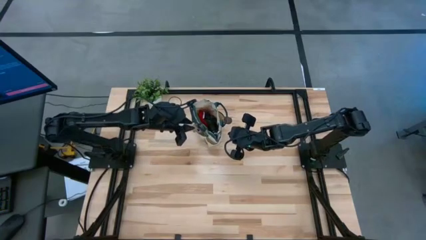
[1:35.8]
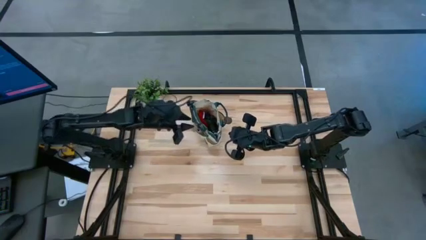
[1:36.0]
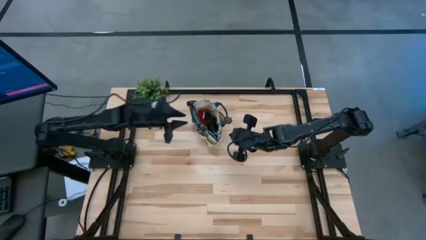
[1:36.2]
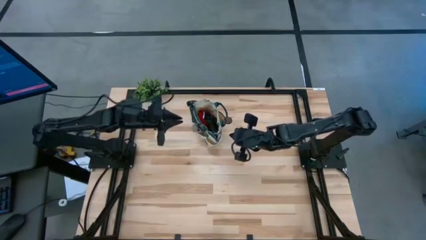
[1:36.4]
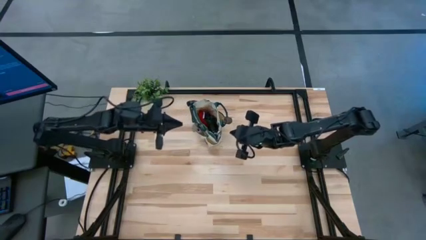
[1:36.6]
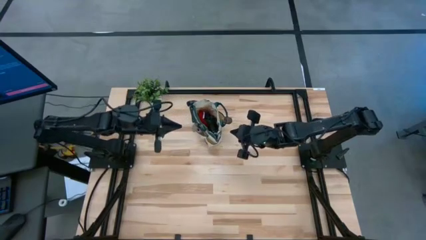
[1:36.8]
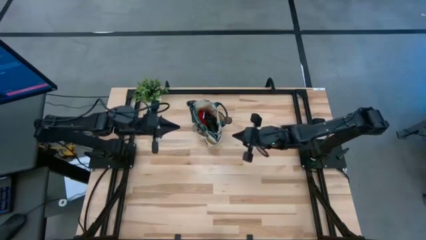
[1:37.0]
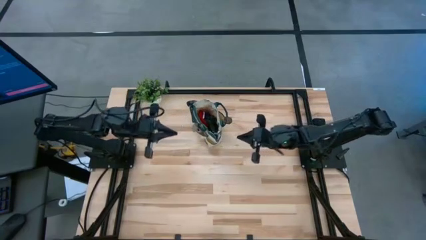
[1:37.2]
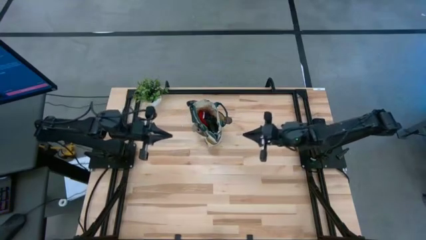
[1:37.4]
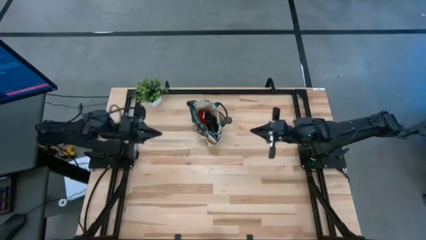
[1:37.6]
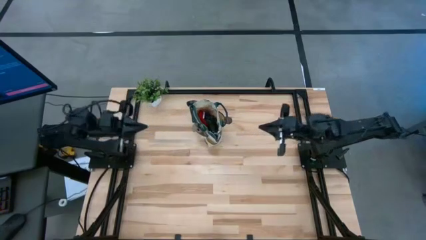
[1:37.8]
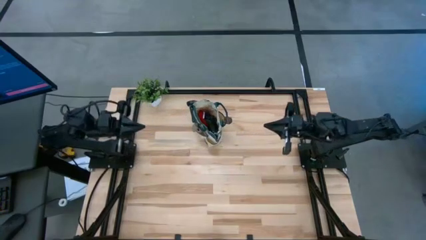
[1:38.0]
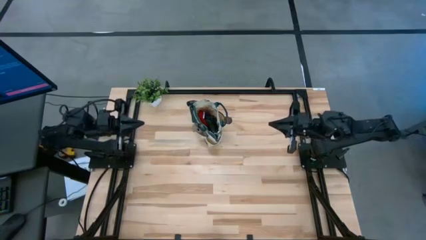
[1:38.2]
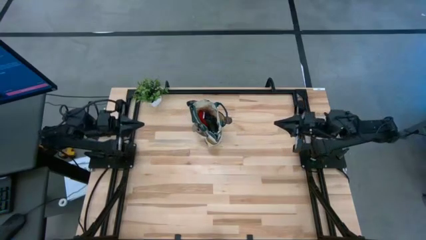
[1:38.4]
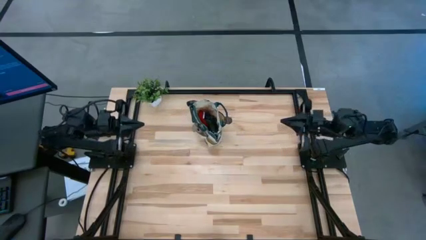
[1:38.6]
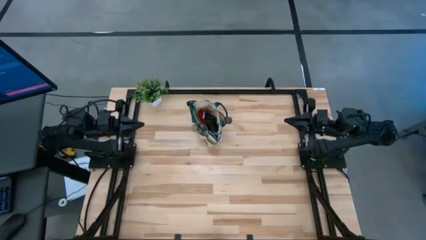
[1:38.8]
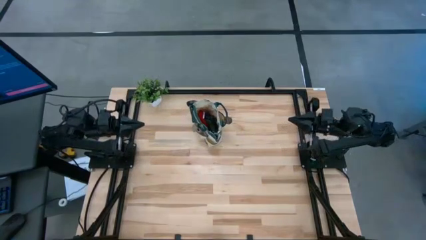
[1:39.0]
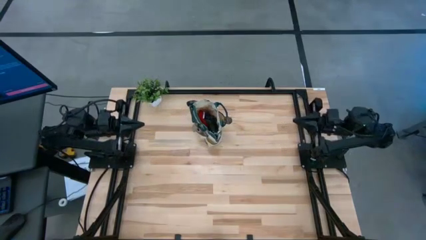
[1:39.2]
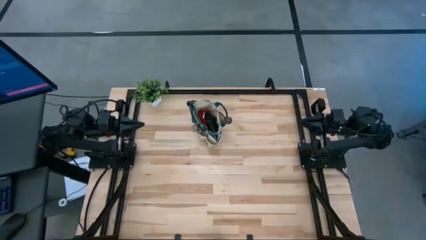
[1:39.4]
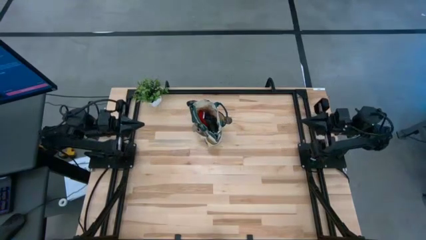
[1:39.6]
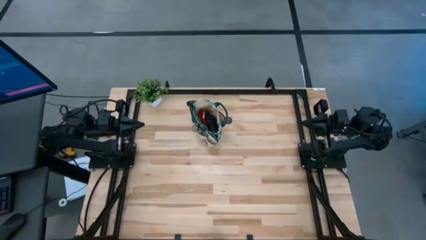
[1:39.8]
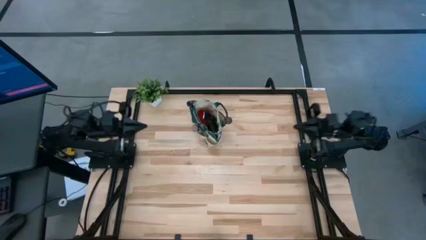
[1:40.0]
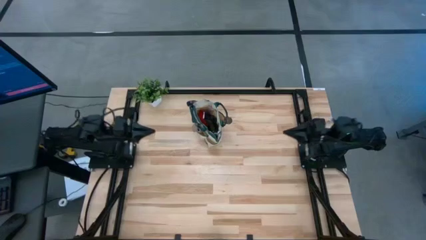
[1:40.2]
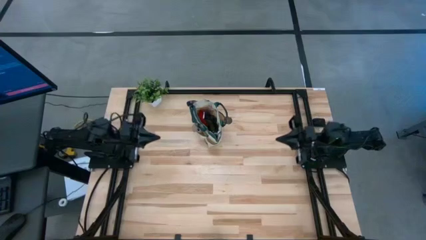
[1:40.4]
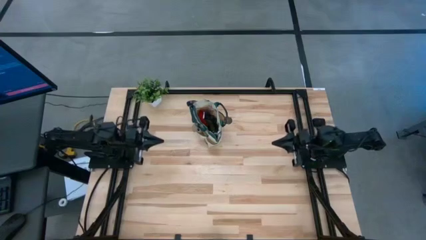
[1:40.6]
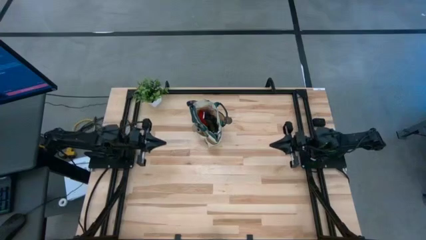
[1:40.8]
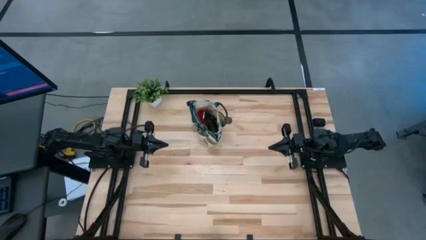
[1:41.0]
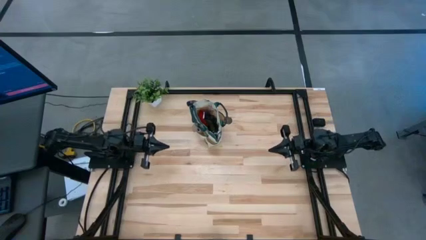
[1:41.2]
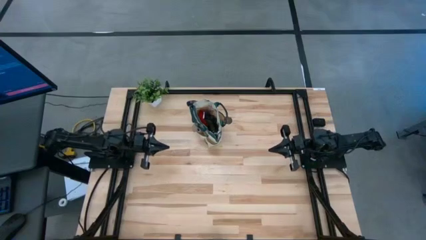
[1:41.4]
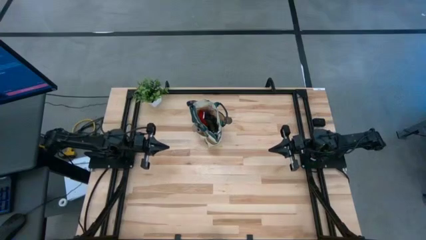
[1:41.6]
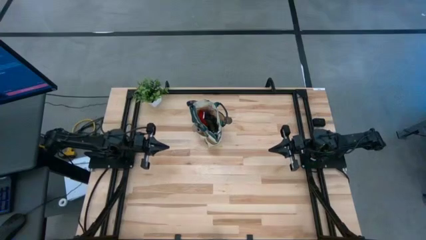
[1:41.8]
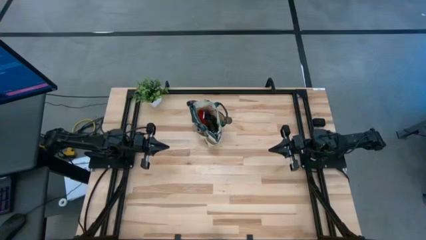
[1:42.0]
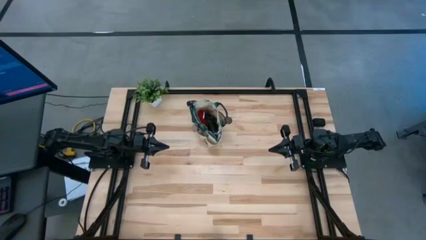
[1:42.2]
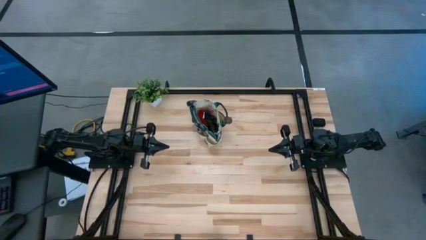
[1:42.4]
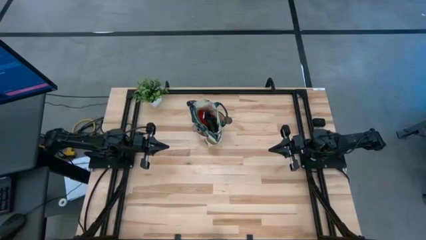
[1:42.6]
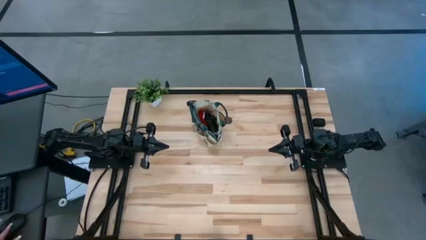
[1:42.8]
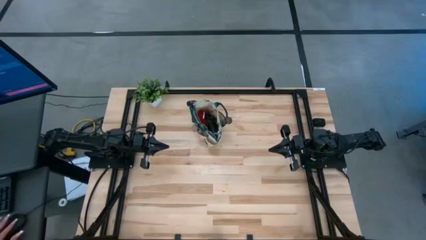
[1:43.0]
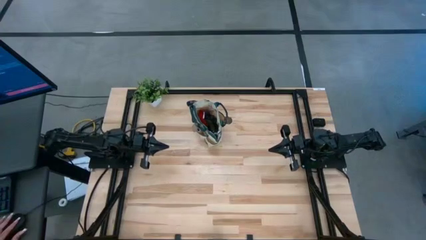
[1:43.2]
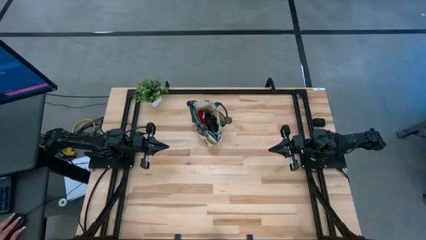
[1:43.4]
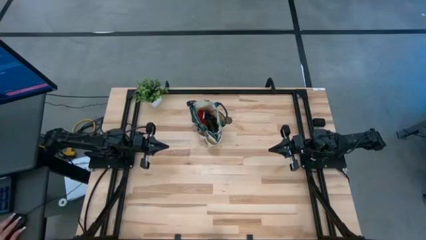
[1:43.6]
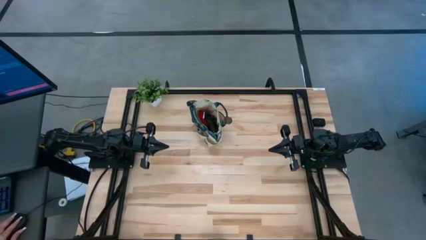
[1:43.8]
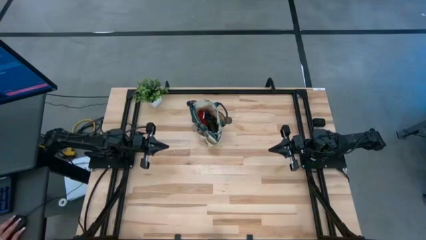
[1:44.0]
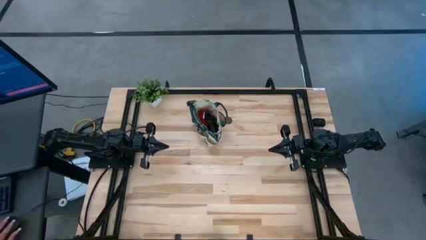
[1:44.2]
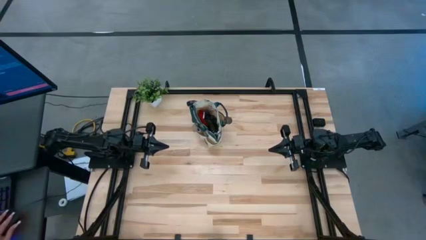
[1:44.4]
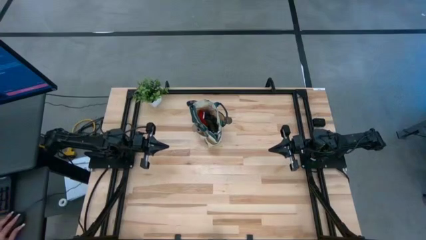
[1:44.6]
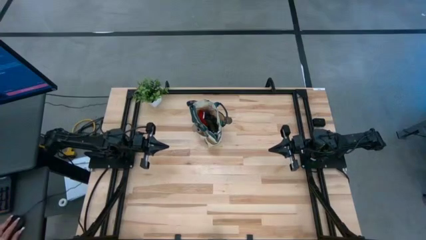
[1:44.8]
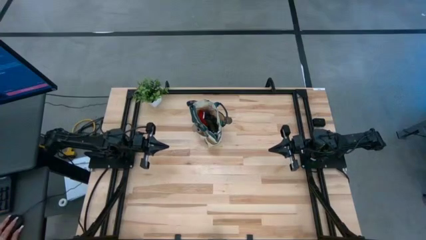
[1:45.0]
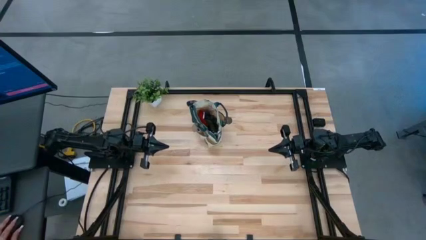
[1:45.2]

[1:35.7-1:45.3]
Task: Pick & Place Garden tools in Gardening bag
Return to Home Position

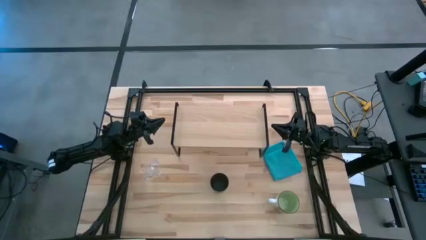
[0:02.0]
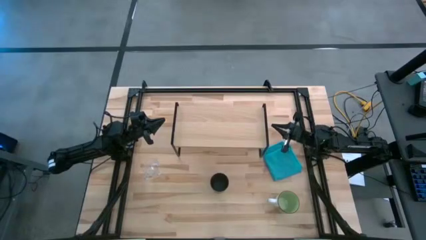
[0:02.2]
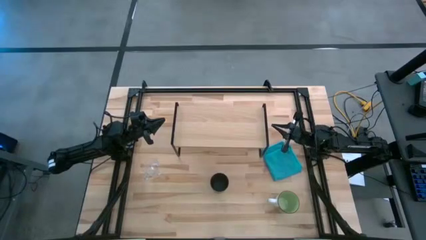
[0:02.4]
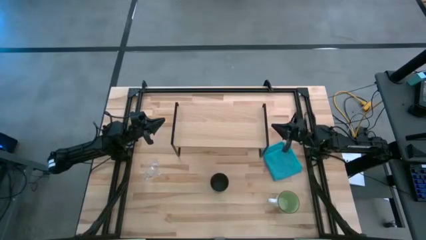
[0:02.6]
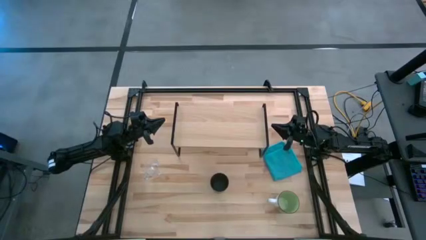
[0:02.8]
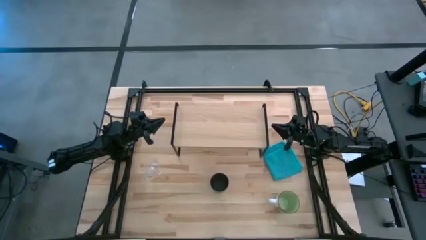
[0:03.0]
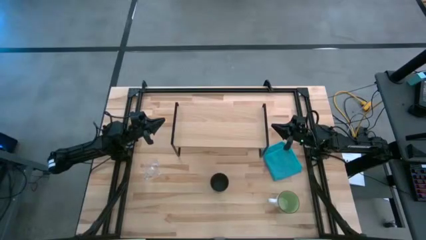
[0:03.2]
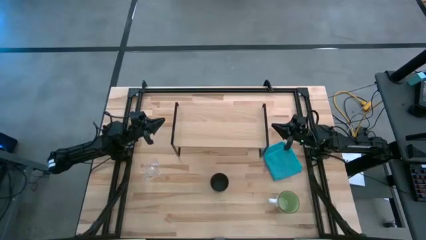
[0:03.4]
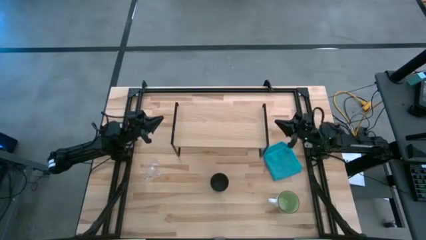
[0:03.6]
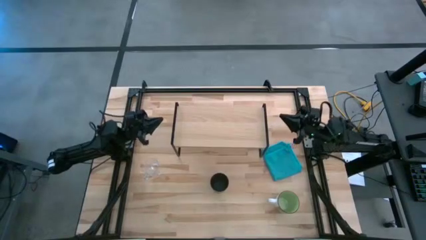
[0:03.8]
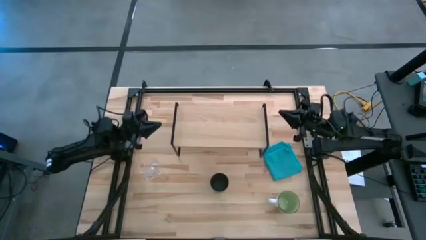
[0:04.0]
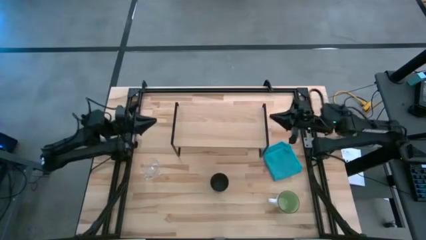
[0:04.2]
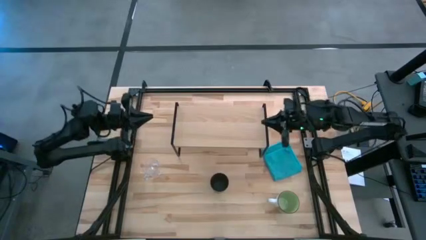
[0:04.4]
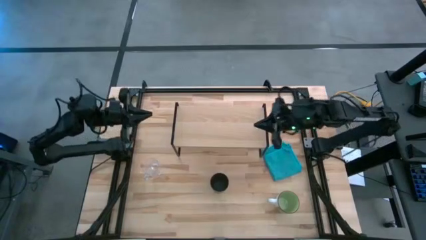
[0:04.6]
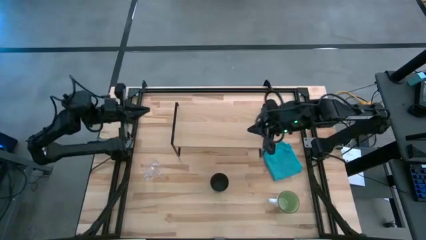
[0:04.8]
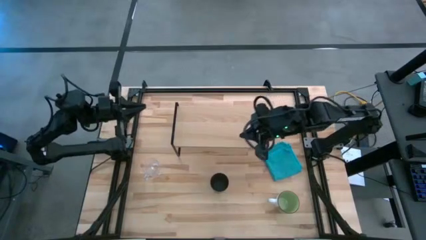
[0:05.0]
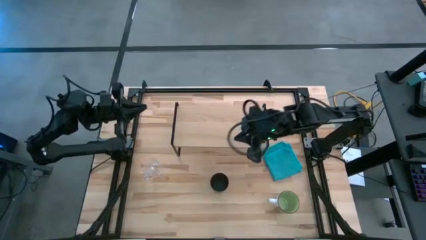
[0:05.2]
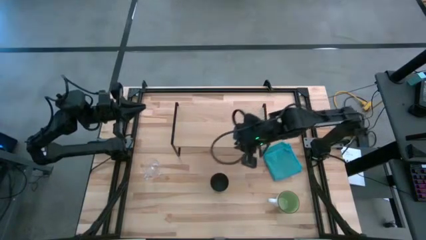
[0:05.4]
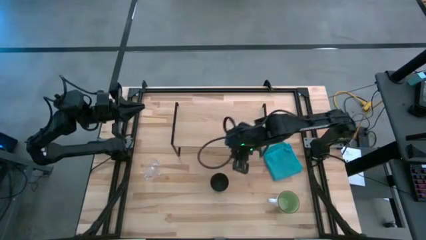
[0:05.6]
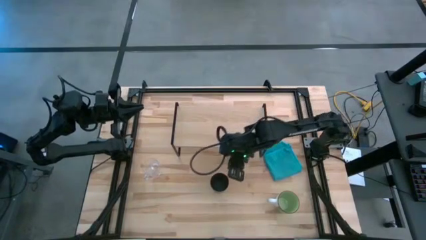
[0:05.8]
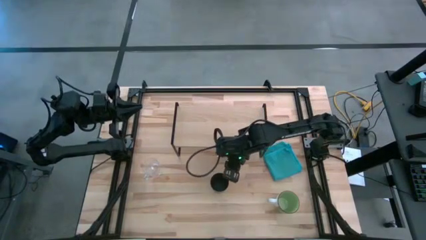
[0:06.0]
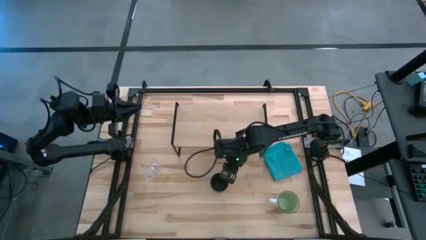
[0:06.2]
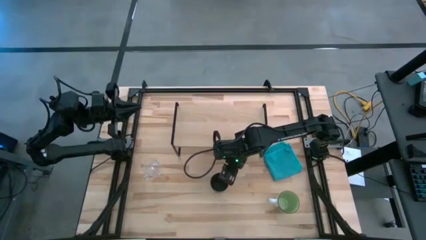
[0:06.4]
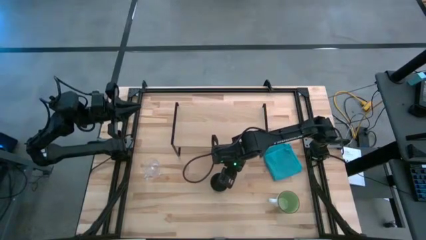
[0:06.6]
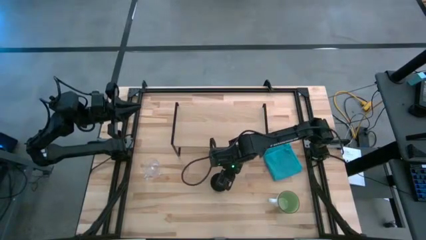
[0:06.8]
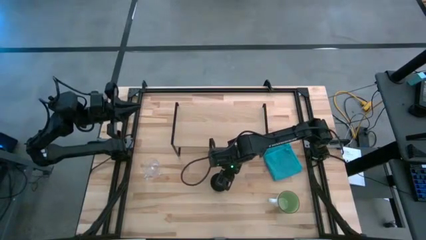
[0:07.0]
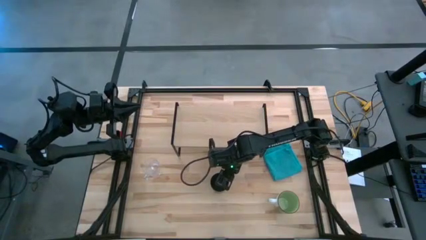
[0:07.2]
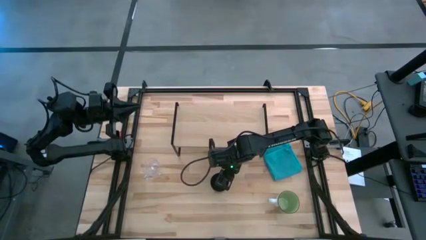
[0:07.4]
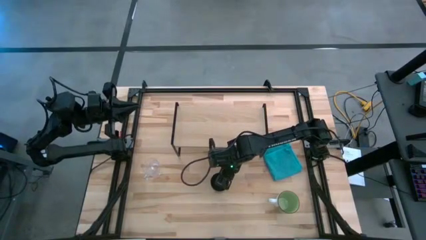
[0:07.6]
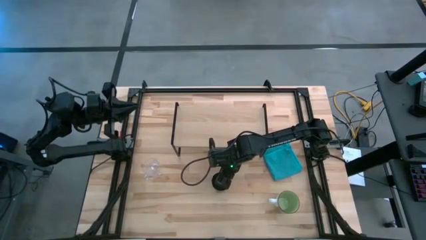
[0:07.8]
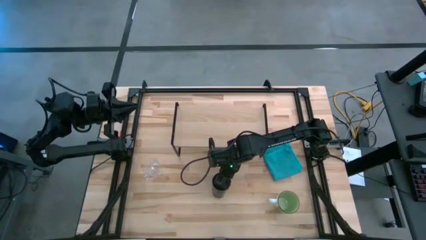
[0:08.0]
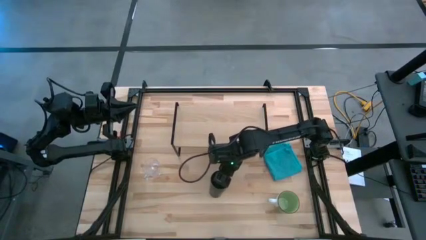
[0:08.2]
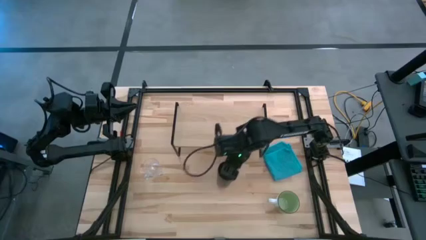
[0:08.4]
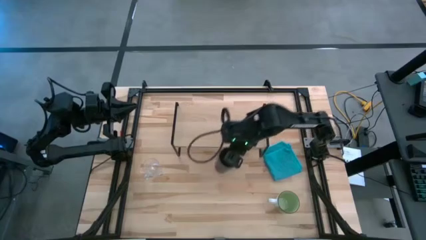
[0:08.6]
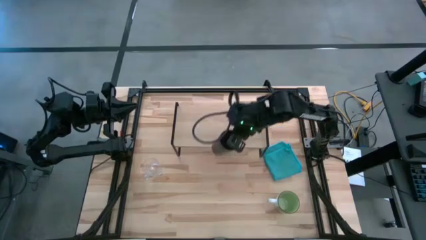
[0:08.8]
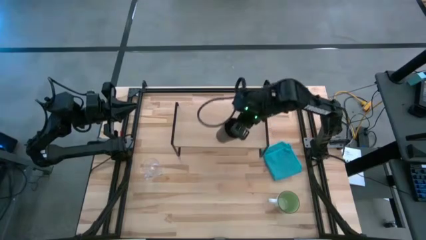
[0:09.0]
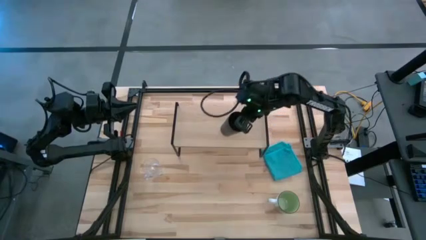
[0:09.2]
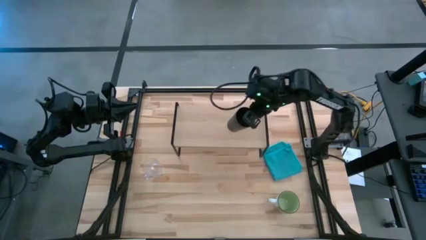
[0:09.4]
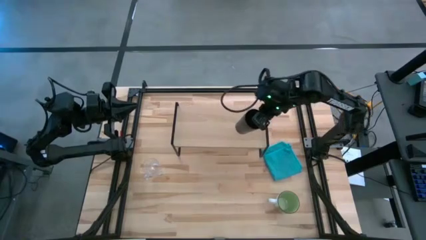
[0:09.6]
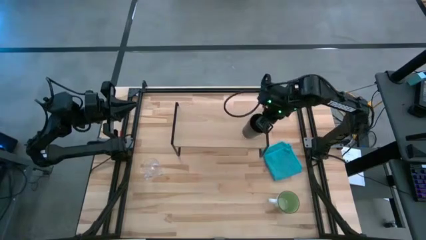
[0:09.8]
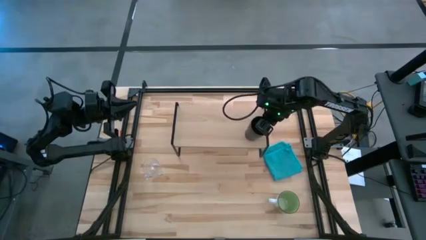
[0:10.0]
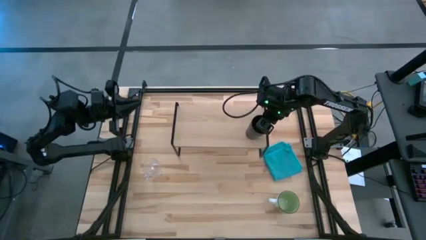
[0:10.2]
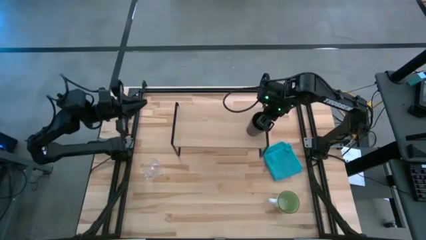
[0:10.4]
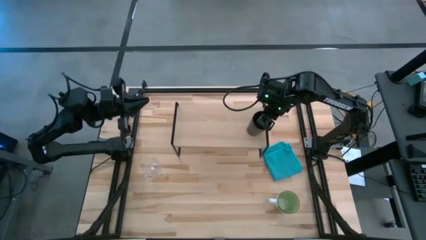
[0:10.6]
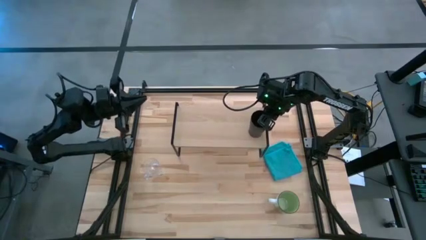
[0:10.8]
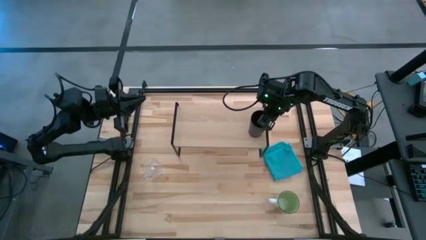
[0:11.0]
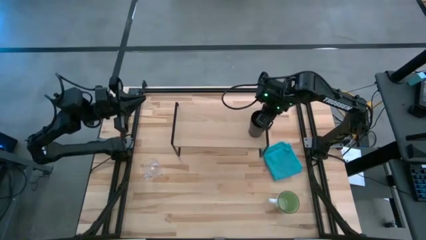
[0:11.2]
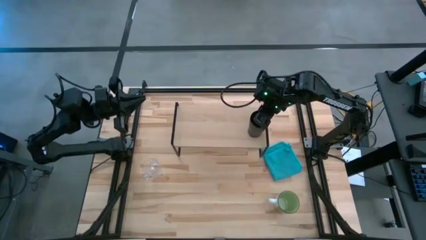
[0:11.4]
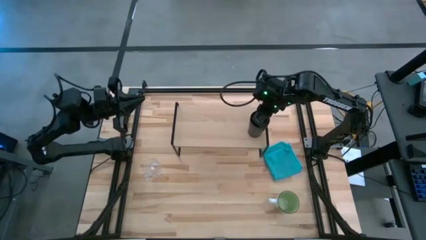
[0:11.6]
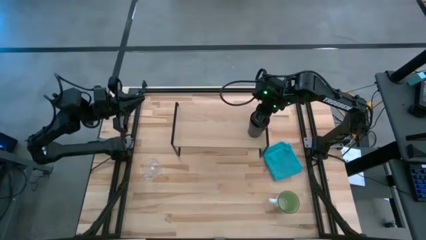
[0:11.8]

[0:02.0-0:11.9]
Task: Stack small to large cups/mugs on shelf
Put the black cup on the shelf
